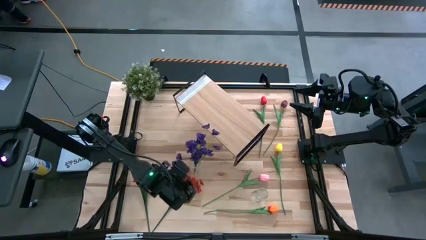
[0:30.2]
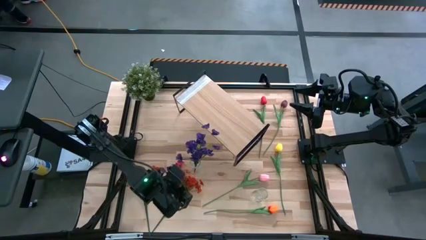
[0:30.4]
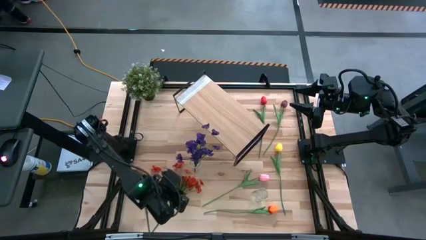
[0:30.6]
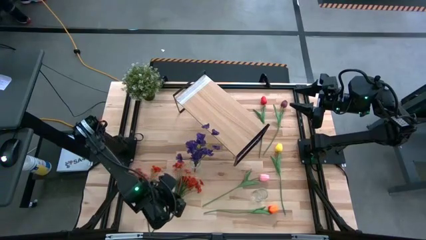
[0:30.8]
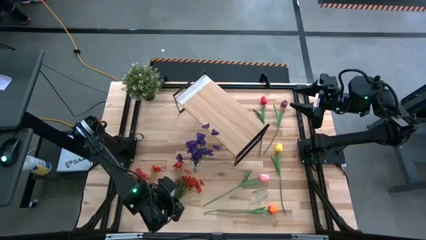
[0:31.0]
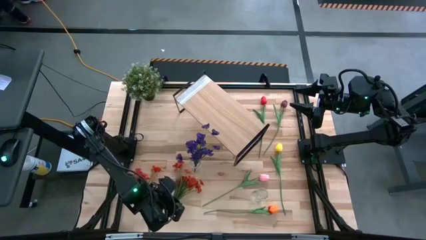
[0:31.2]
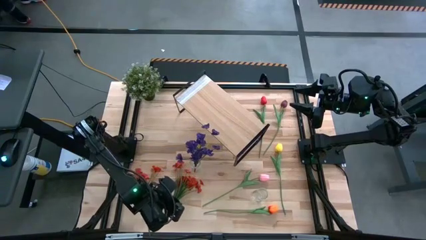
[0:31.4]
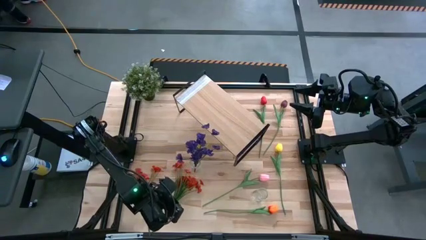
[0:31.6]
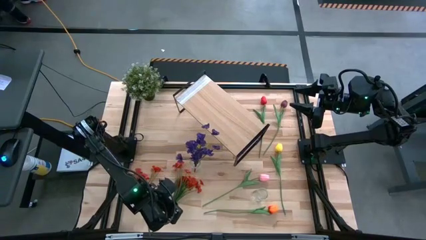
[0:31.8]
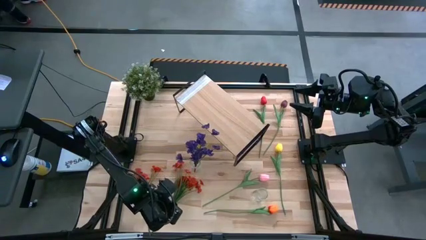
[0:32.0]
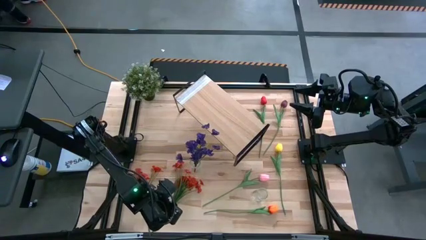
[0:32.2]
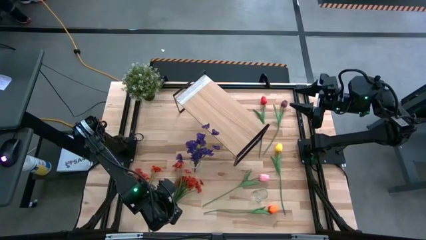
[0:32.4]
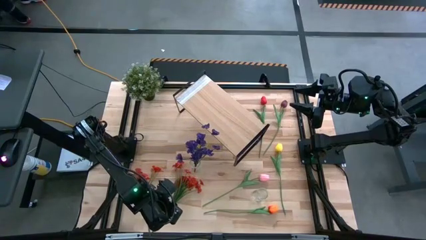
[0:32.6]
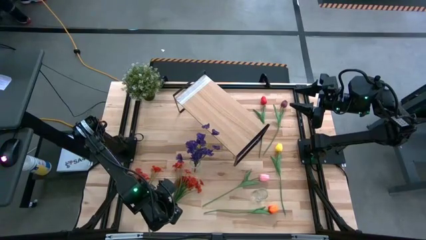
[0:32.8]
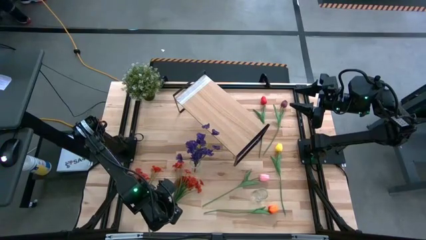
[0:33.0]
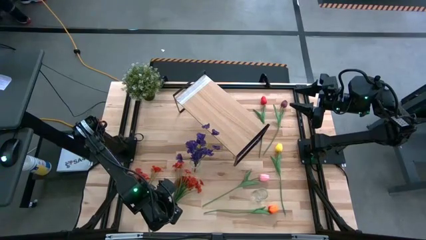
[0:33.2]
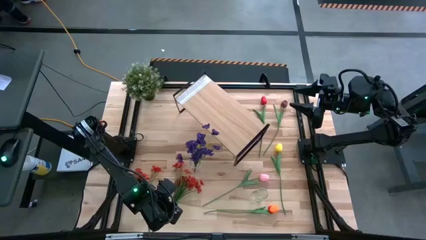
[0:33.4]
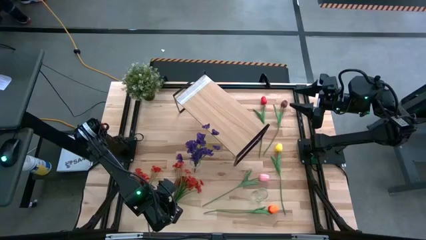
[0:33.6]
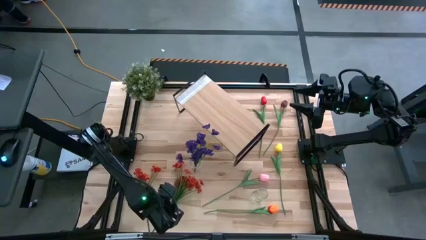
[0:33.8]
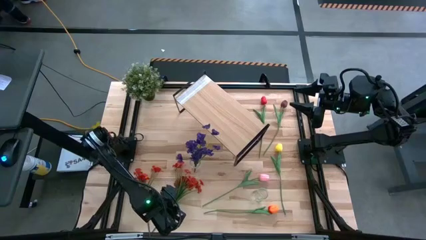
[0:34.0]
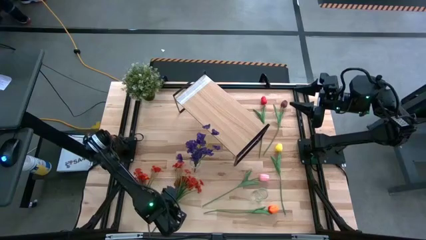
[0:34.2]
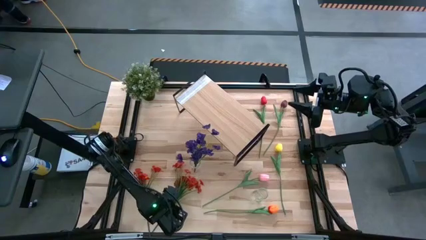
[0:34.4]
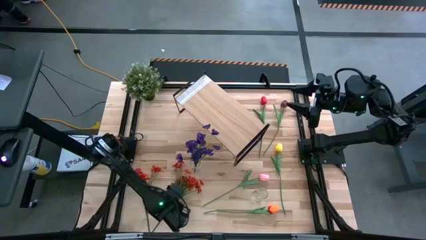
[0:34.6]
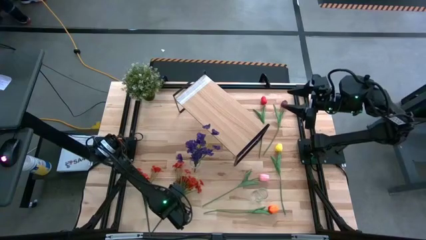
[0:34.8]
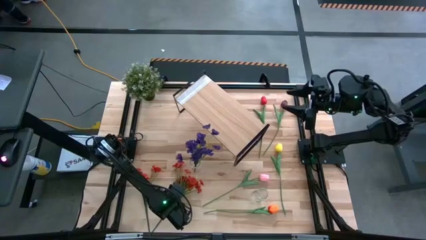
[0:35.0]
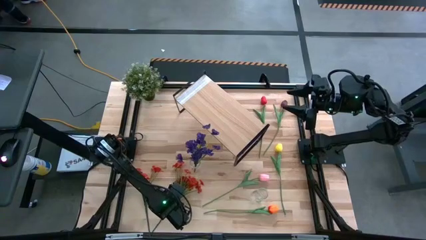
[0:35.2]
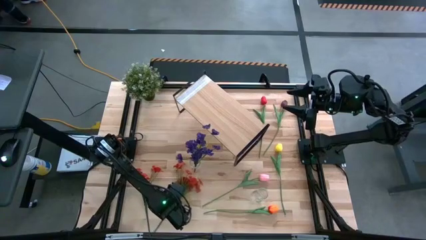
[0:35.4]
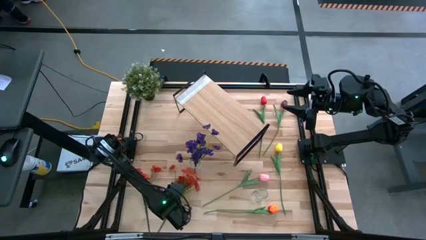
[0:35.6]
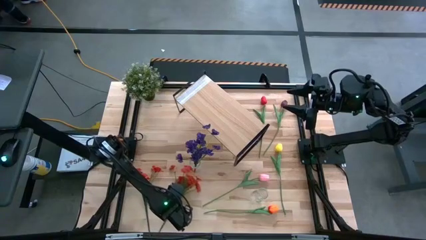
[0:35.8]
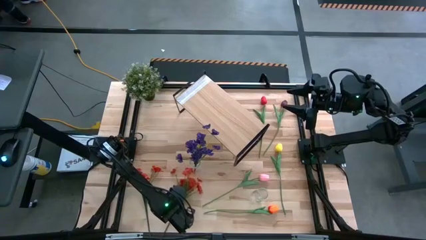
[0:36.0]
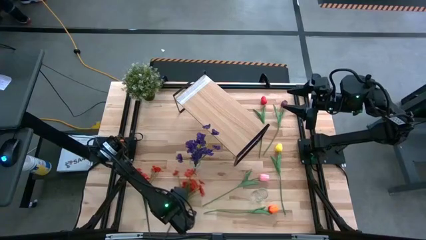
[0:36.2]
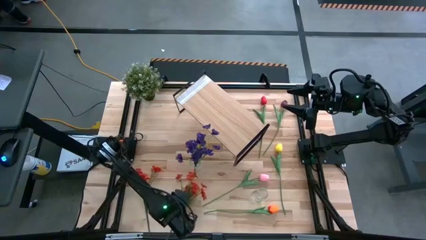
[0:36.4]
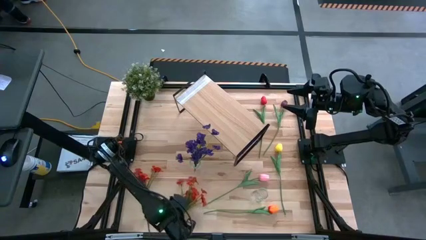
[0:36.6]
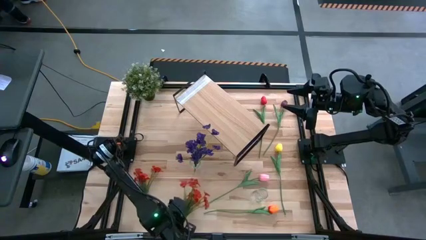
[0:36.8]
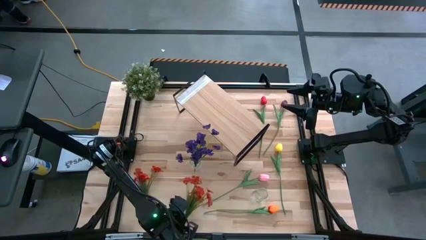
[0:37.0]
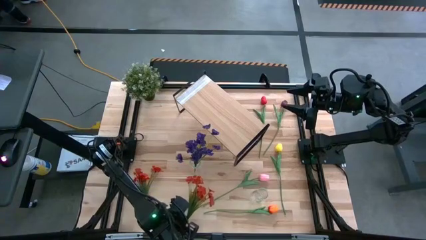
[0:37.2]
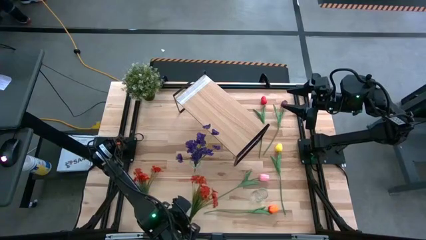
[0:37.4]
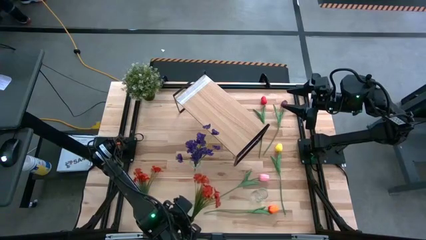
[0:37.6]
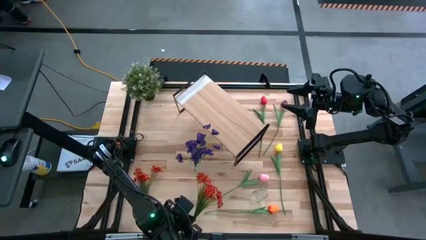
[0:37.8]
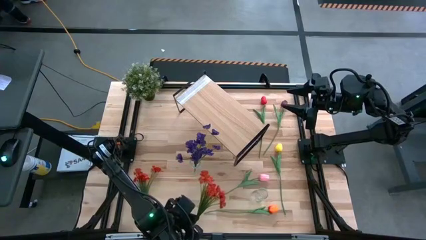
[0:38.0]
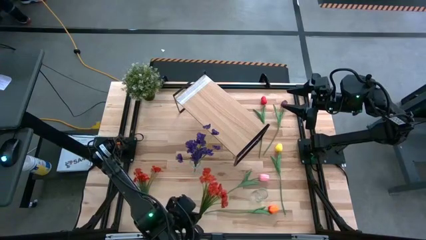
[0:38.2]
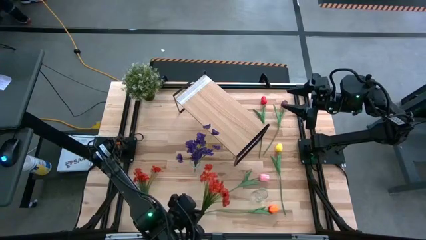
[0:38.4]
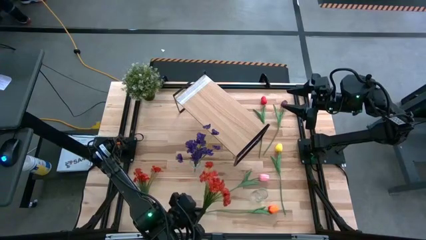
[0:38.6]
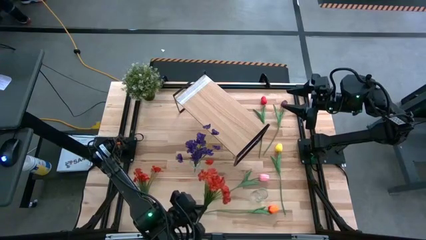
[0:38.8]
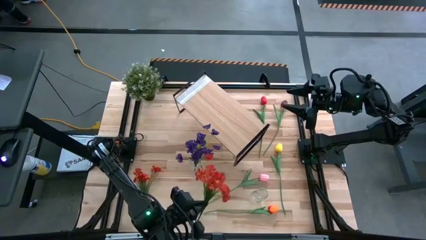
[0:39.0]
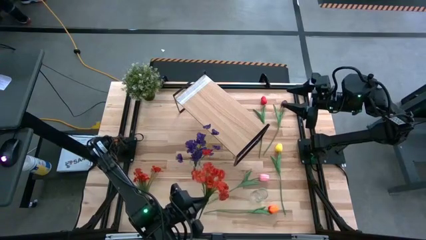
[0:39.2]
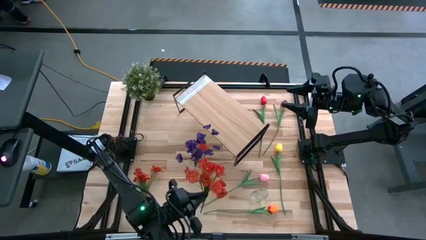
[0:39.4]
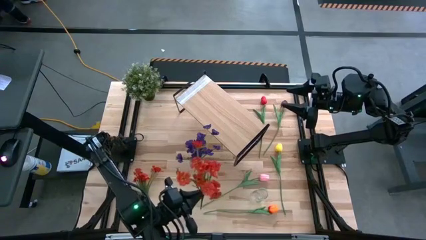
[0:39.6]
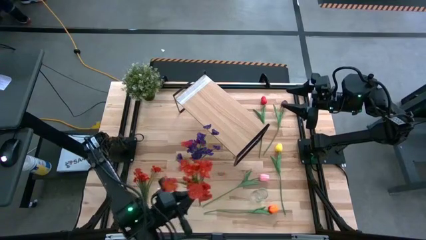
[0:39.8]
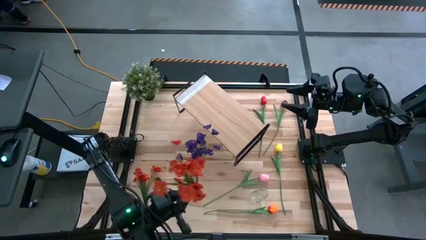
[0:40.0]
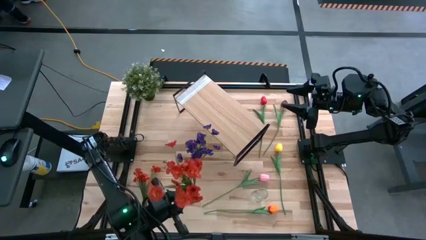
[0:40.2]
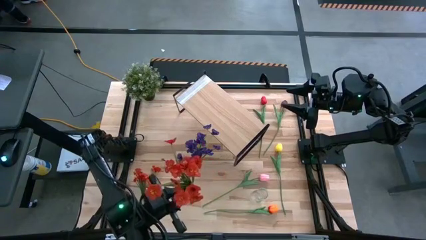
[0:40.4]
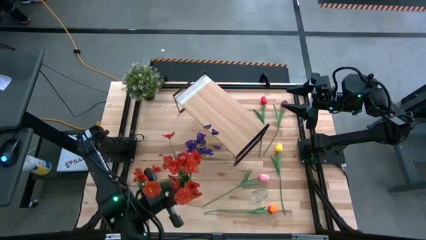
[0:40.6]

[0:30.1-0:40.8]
Task: Pick and place flowers into a vace then onto a shelf
Put the right orange flower into the left transparent vase
